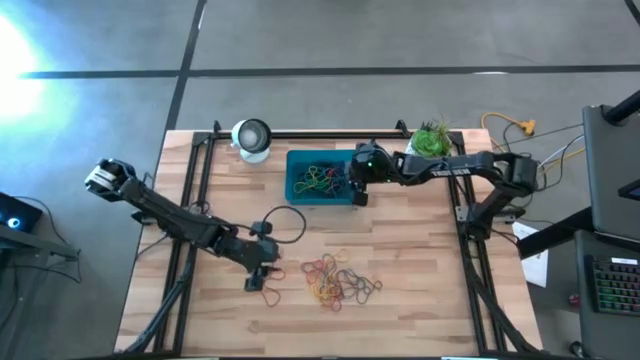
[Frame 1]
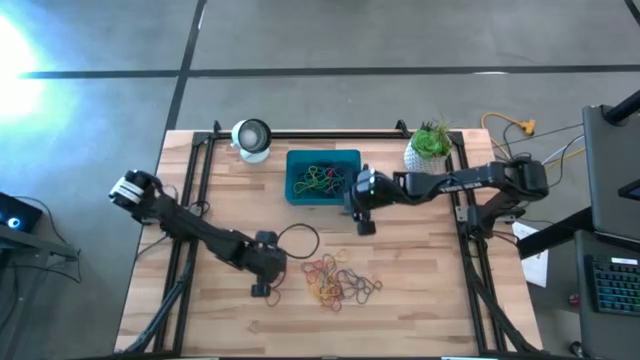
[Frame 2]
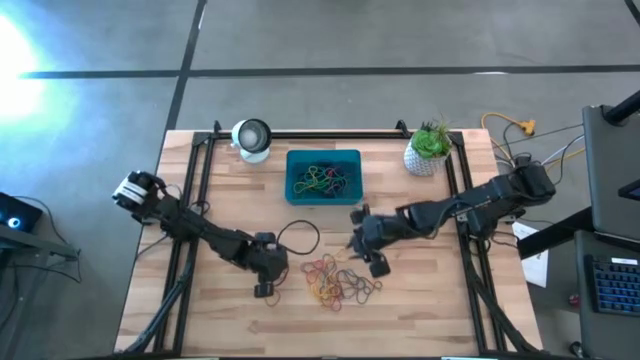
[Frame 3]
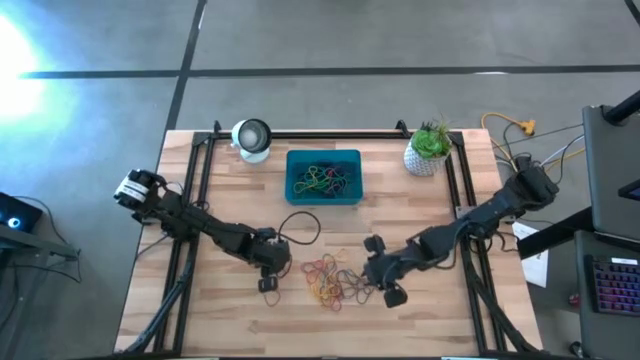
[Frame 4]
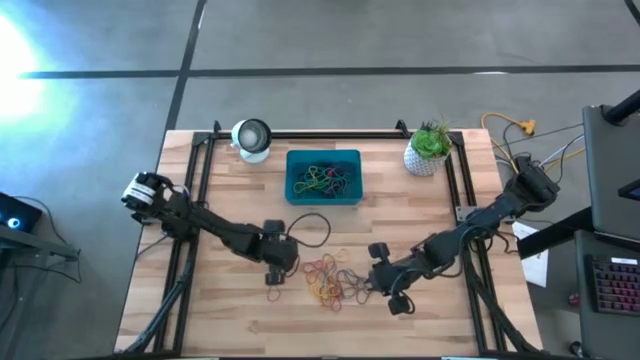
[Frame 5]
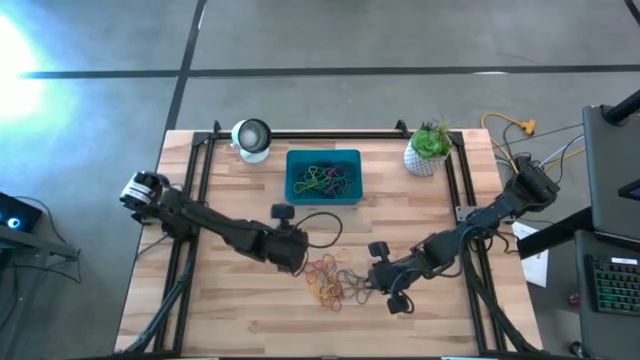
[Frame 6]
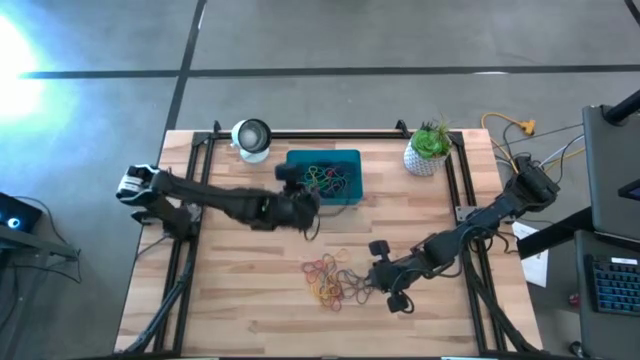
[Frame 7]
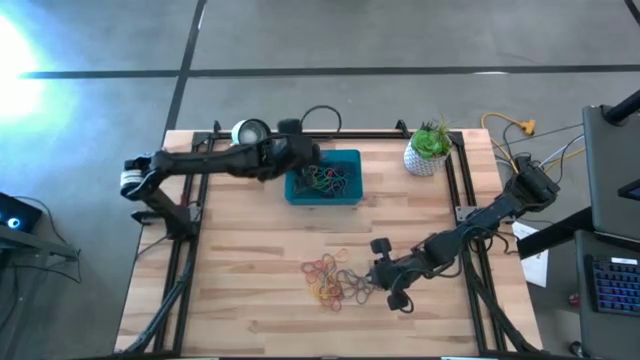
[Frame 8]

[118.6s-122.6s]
Task: Pick and place rubber bands into bin
Put the red rubber band into the bin

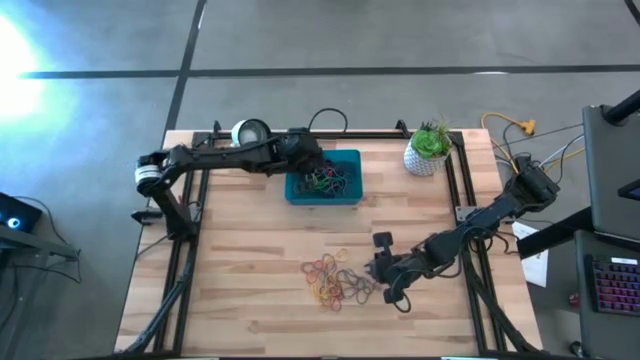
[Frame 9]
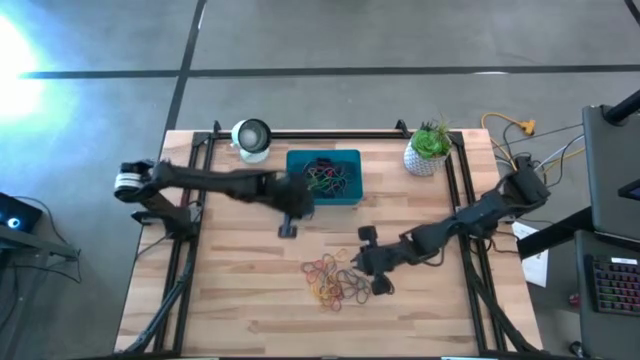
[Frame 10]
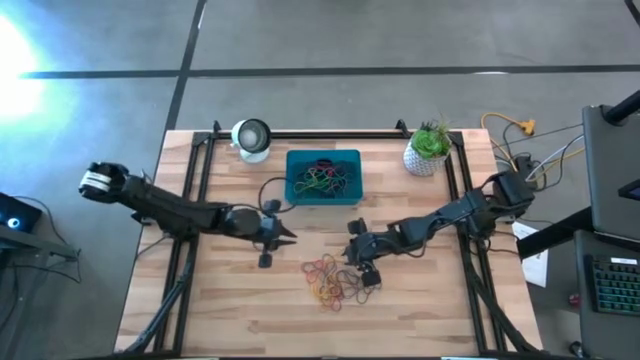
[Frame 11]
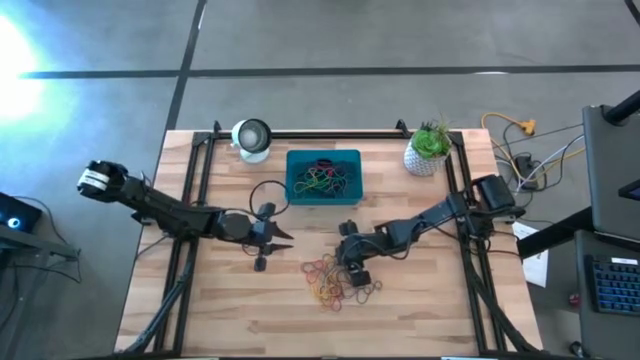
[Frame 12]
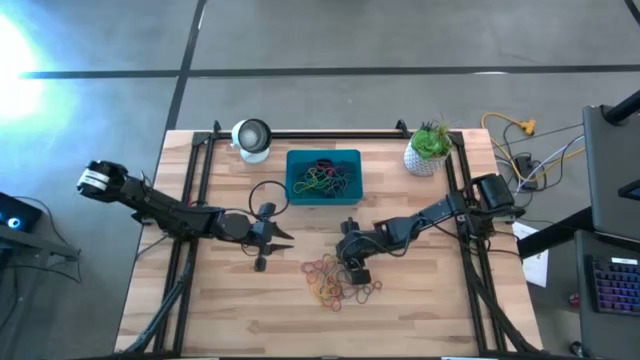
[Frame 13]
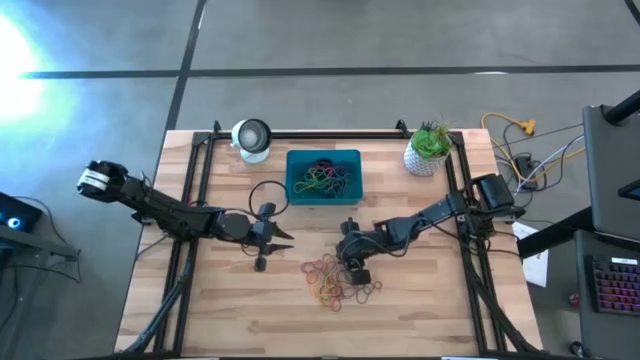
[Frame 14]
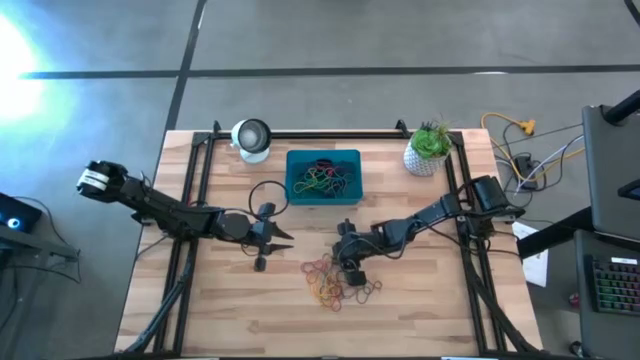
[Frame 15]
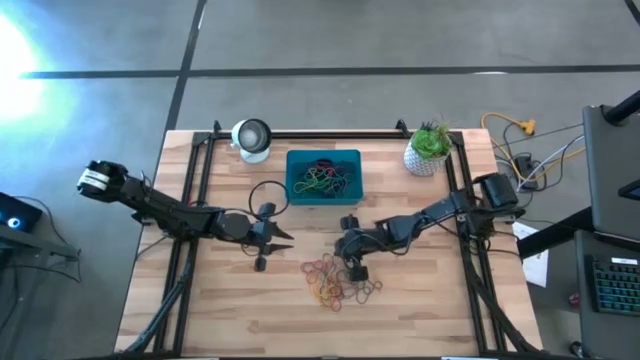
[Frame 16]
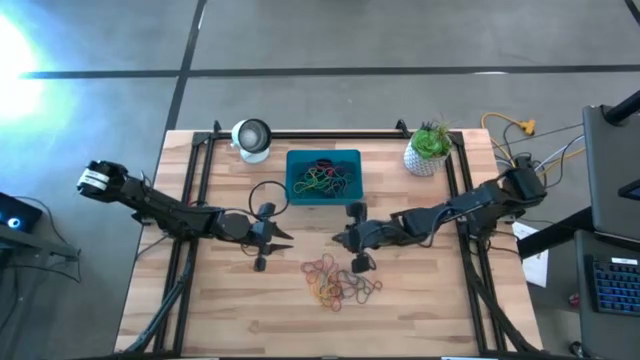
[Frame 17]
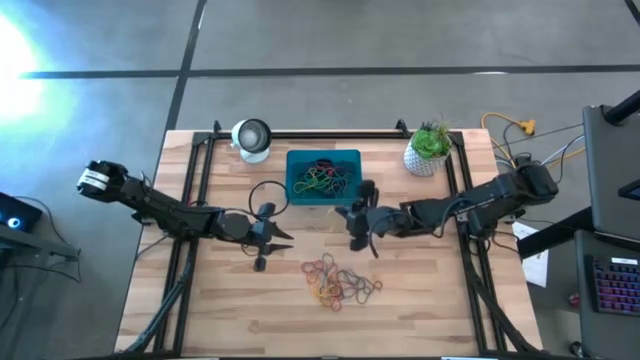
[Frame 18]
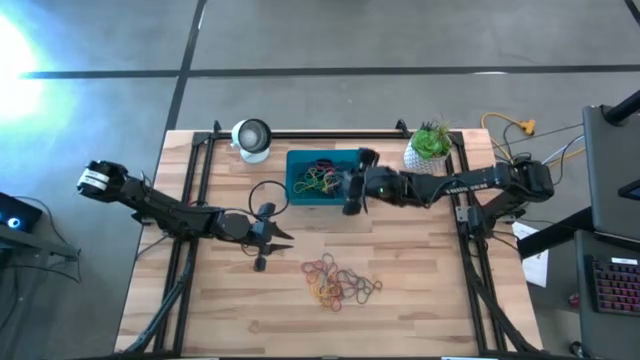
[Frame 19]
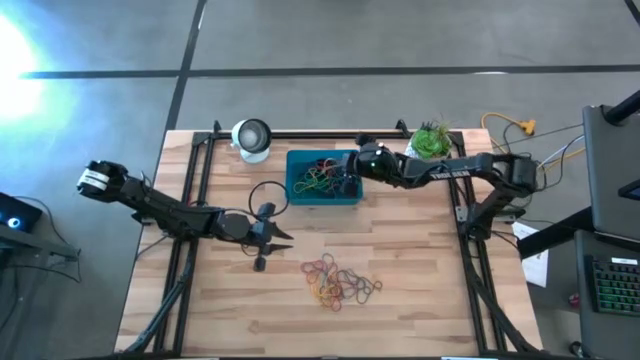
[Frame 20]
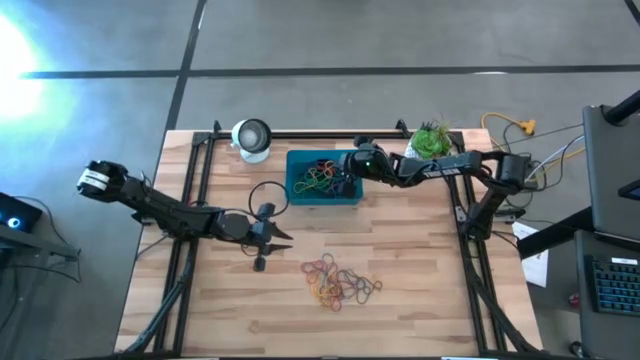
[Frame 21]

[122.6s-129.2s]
Put the yellow rubber band into the bin

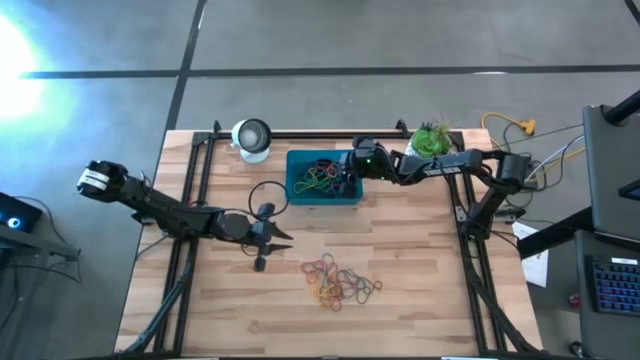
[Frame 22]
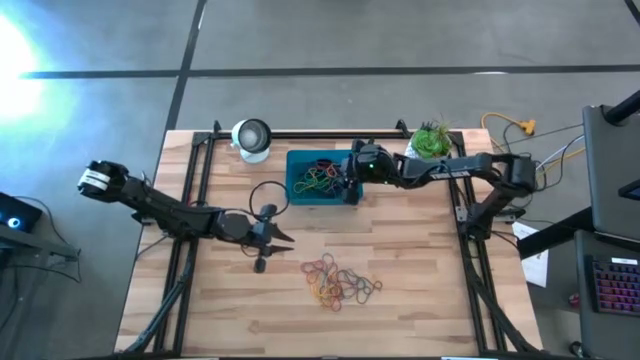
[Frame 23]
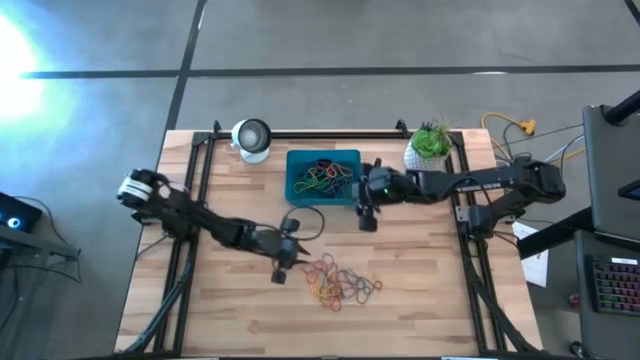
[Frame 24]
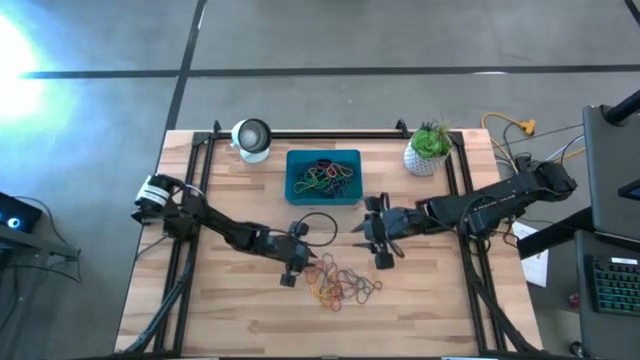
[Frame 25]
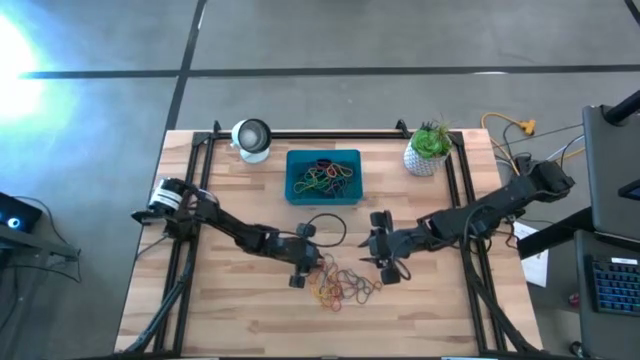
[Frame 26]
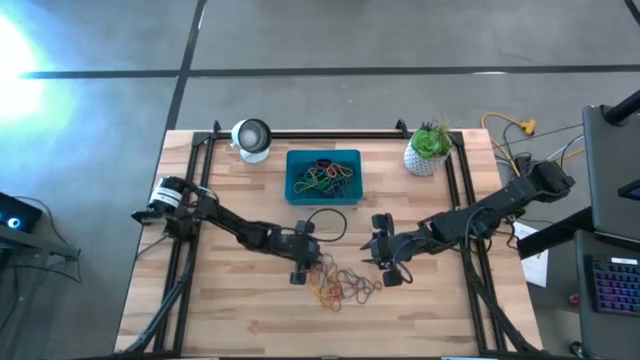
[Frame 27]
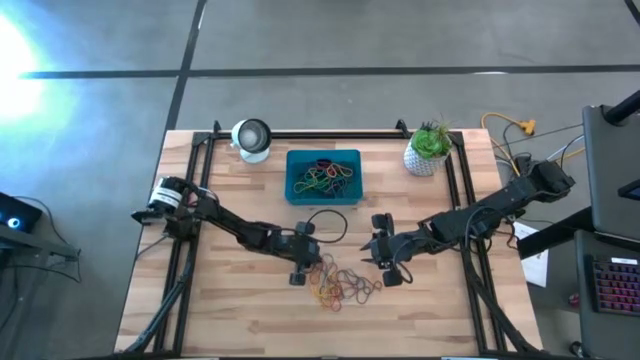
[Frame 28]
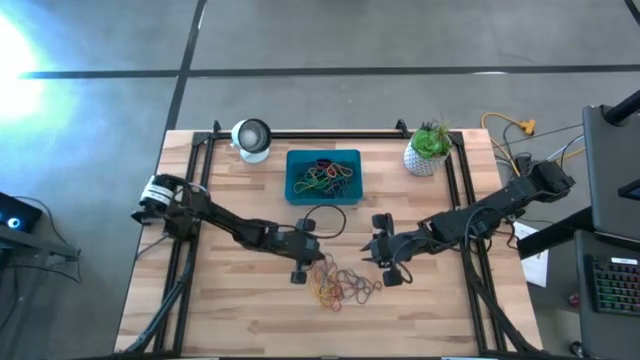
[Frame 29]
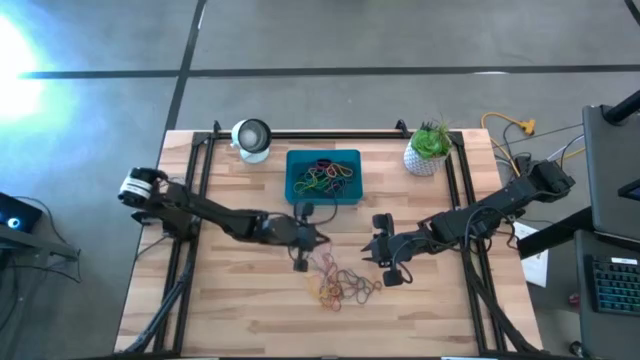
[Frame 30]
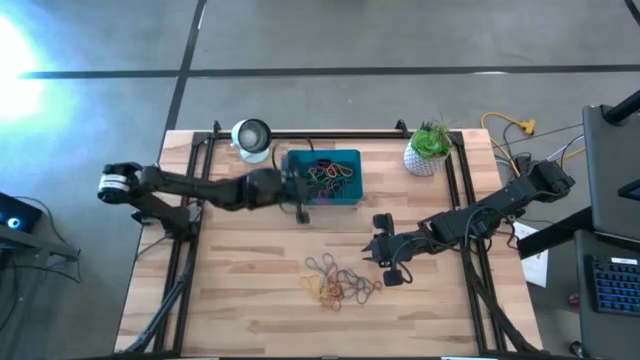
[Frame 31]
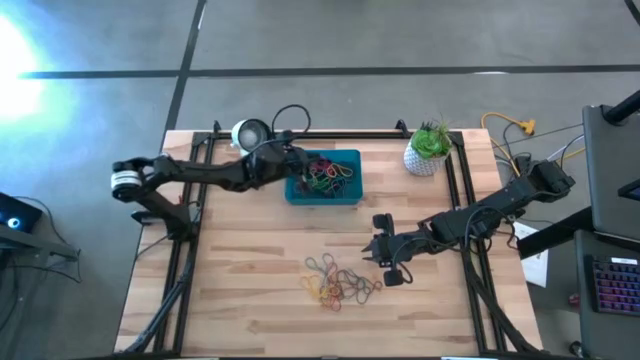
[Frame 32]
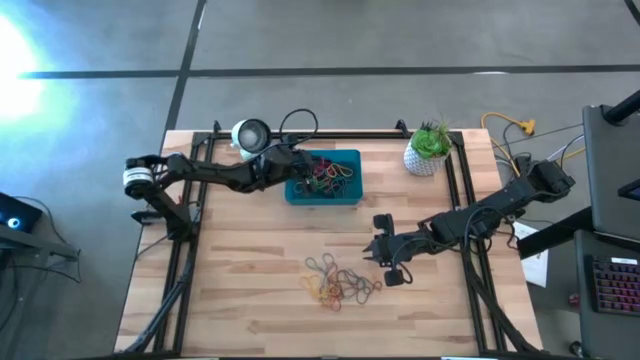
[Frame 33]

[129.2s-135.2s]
Put the red rubber band into the bin

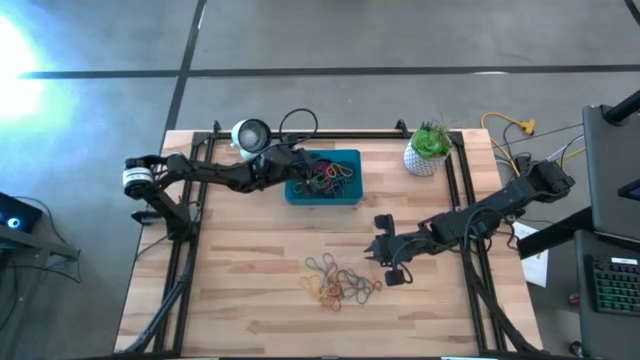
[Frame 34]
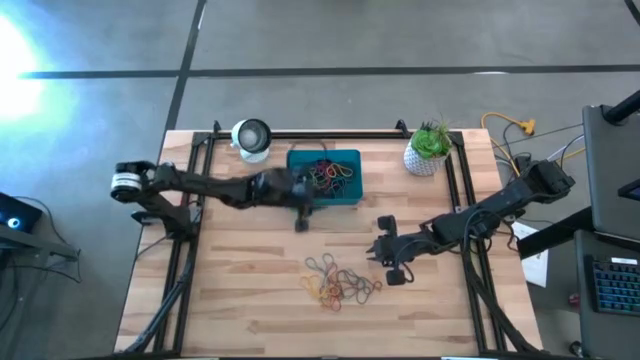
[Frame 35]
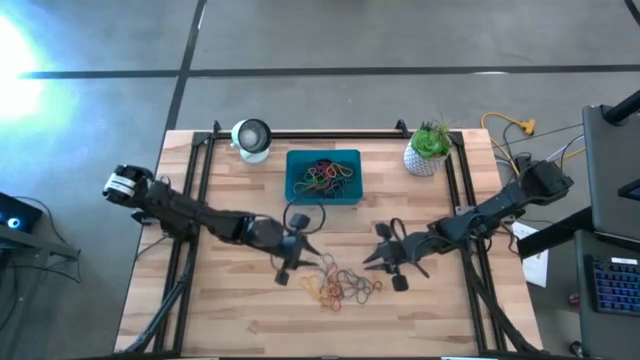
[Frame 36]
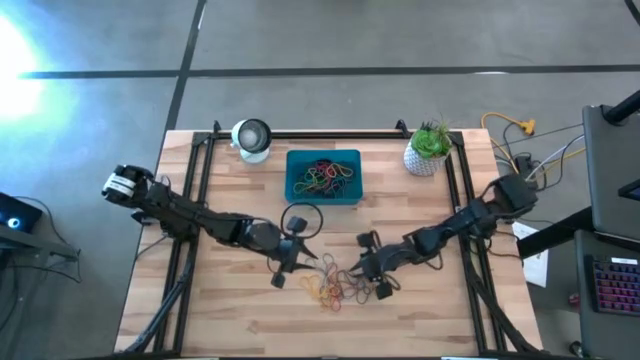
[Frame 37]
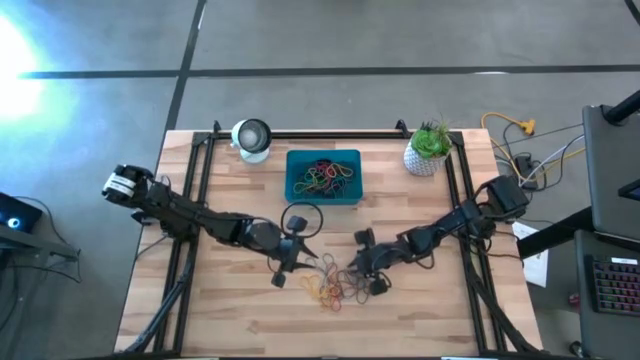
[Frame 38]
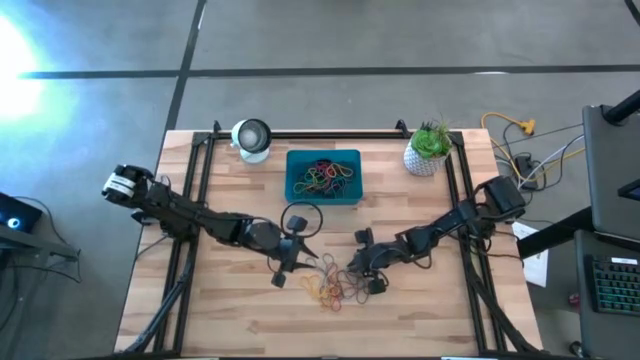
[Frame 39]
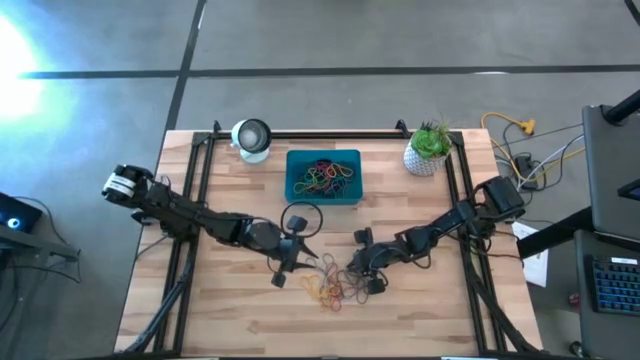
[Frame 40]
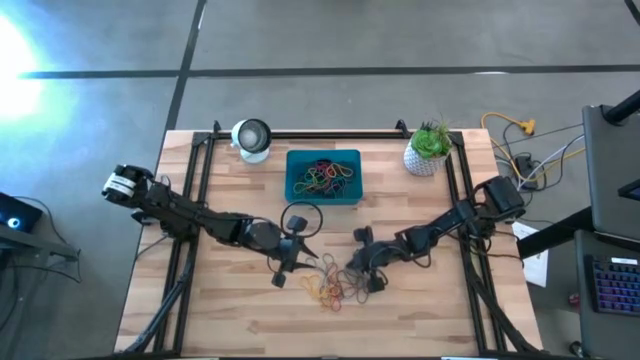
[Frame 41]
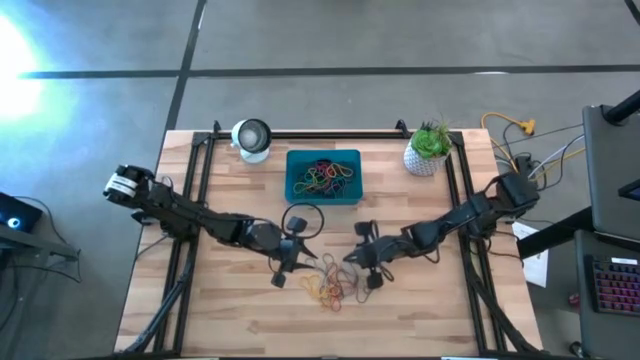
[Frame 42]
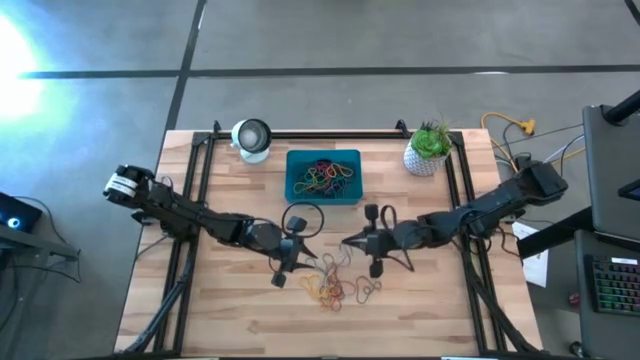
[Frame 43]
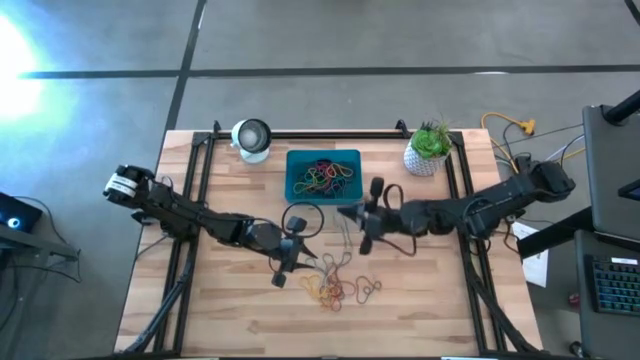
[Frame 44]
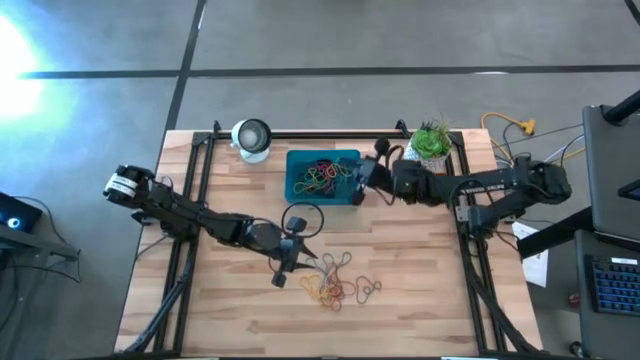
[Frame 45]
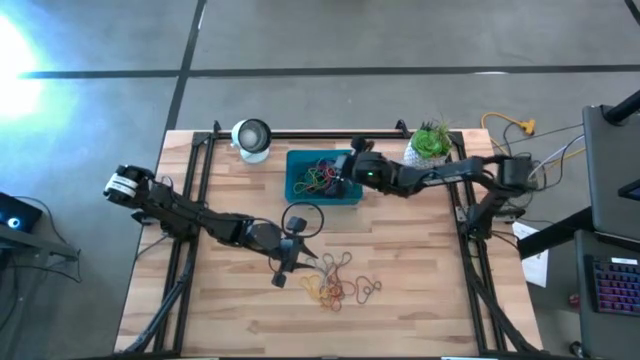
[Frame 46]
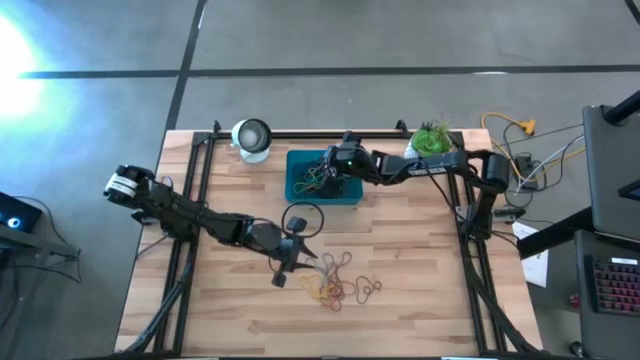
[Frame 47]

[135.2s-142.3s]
Put the blue rubber band into the bin
